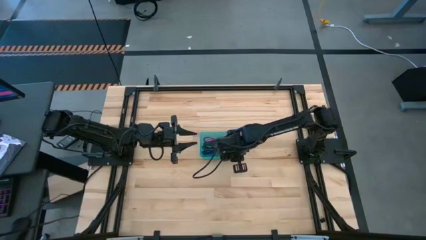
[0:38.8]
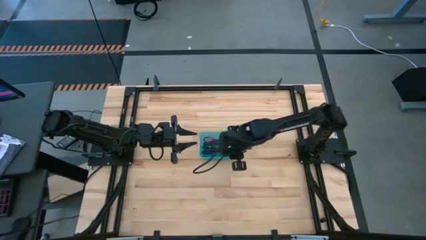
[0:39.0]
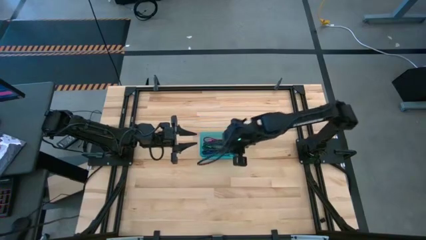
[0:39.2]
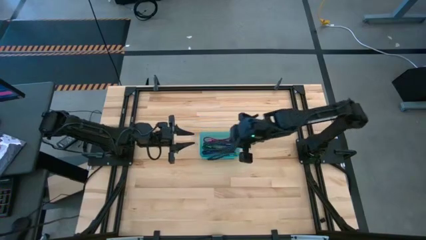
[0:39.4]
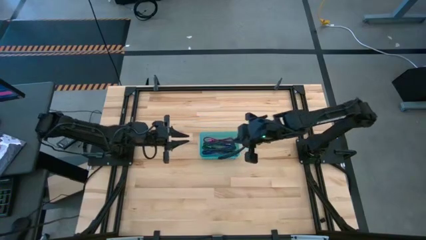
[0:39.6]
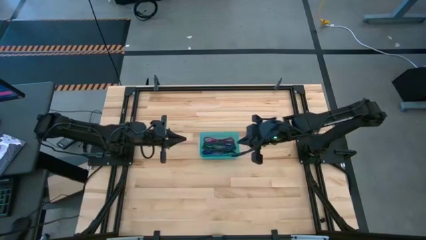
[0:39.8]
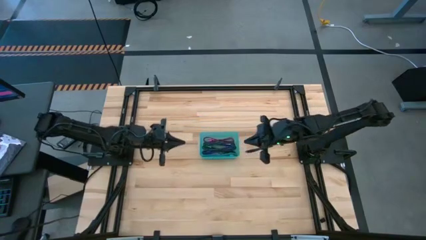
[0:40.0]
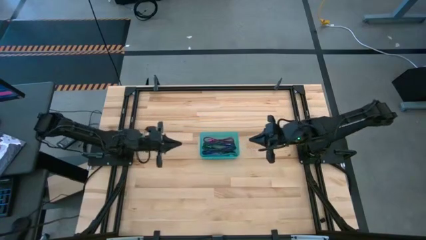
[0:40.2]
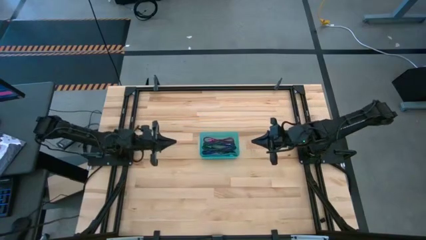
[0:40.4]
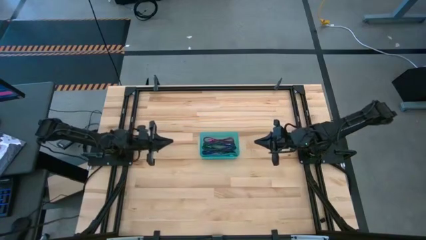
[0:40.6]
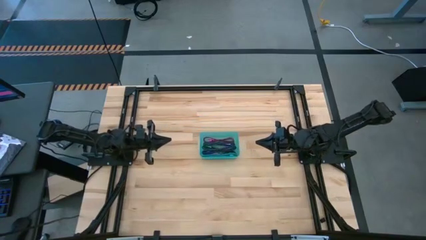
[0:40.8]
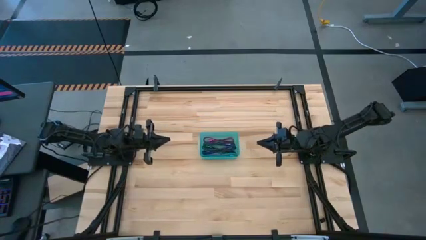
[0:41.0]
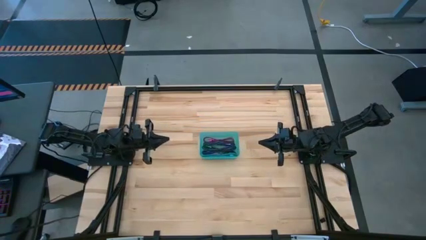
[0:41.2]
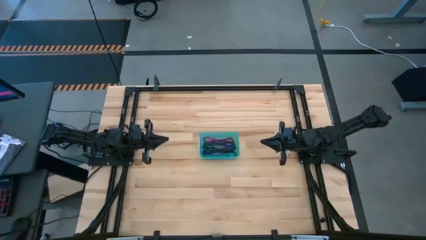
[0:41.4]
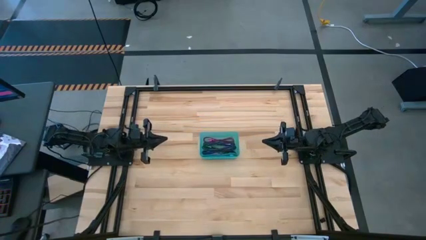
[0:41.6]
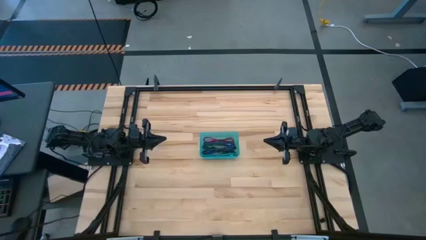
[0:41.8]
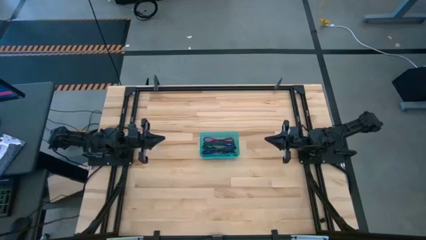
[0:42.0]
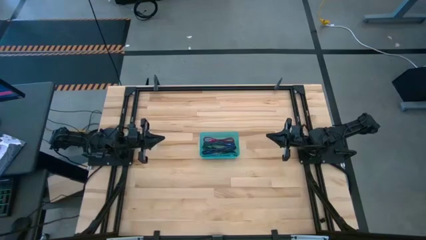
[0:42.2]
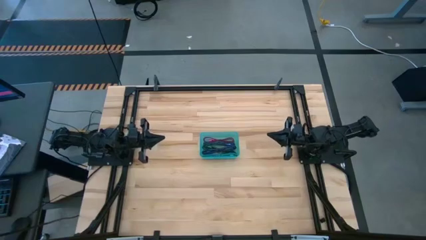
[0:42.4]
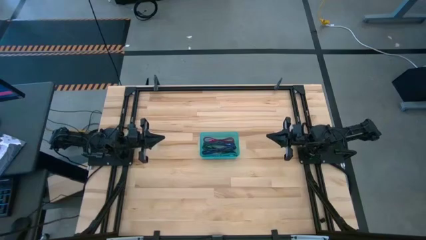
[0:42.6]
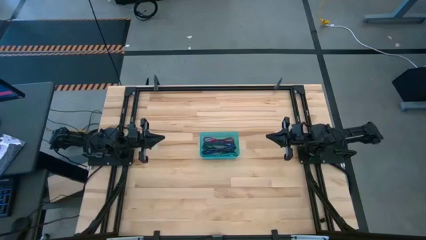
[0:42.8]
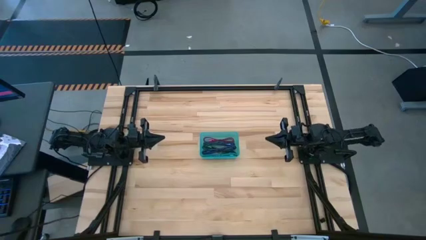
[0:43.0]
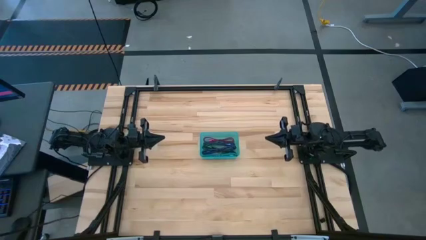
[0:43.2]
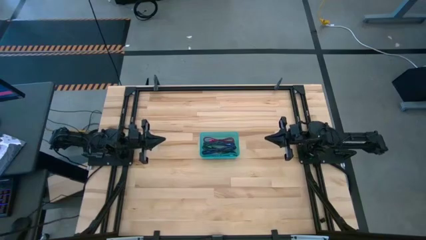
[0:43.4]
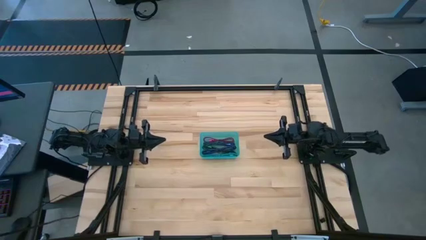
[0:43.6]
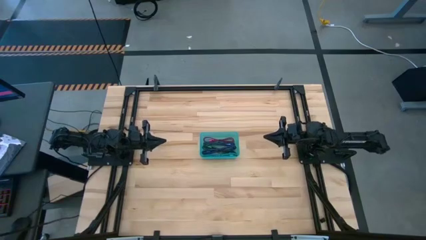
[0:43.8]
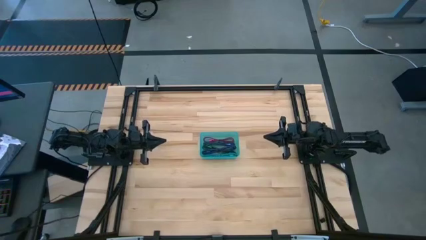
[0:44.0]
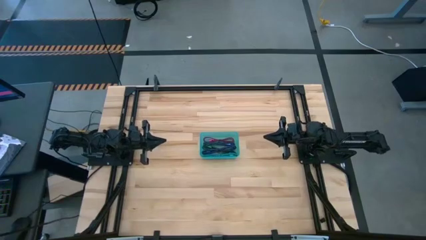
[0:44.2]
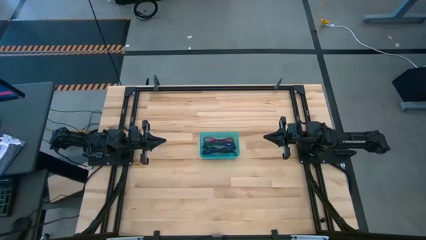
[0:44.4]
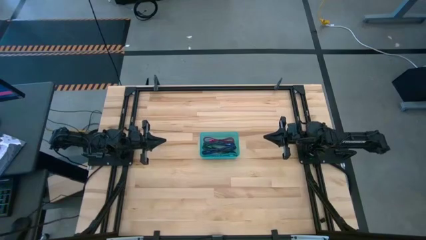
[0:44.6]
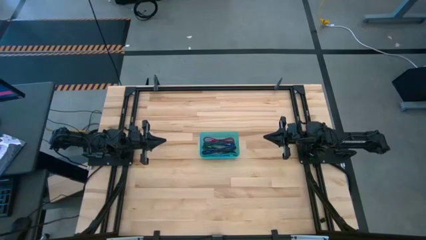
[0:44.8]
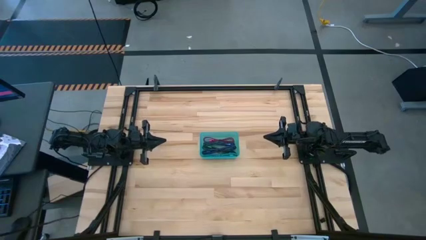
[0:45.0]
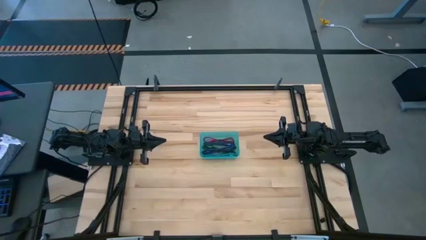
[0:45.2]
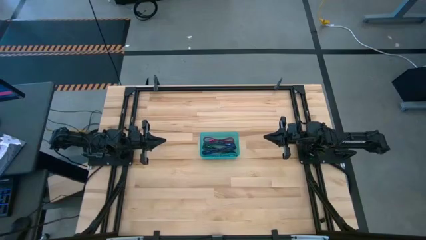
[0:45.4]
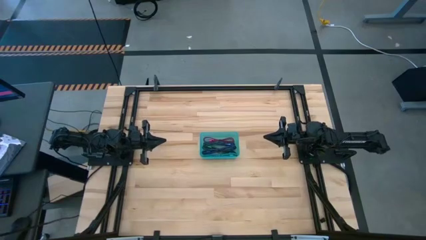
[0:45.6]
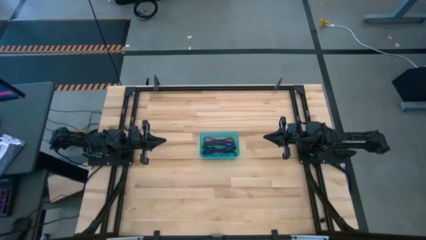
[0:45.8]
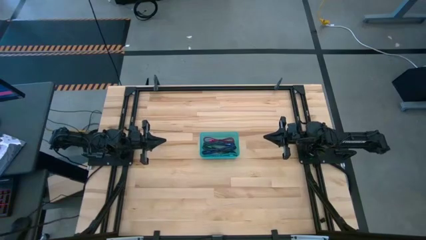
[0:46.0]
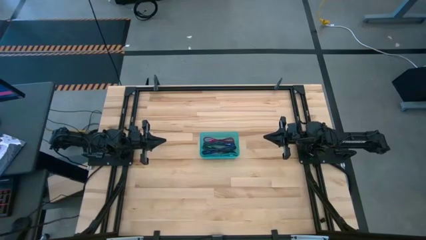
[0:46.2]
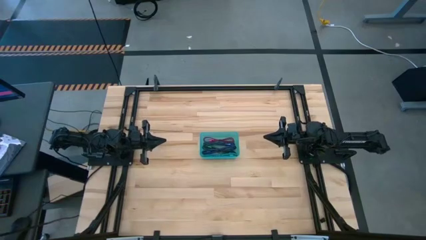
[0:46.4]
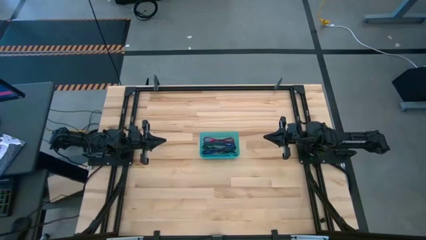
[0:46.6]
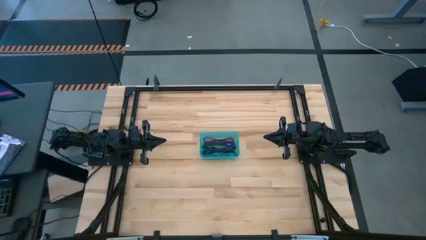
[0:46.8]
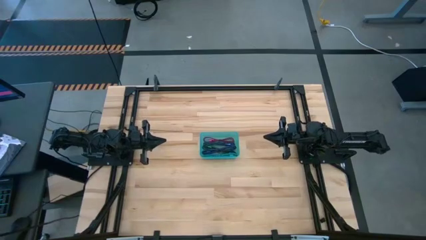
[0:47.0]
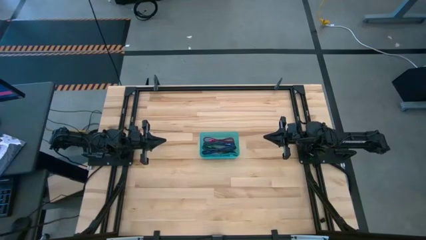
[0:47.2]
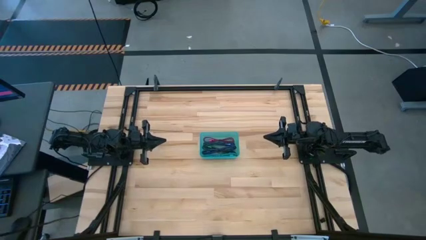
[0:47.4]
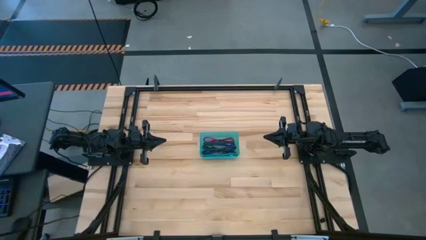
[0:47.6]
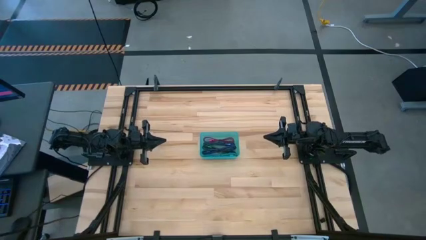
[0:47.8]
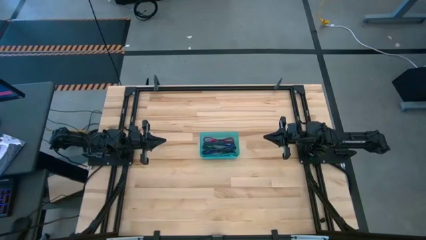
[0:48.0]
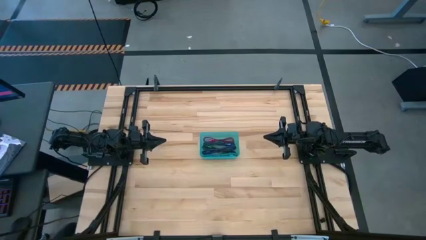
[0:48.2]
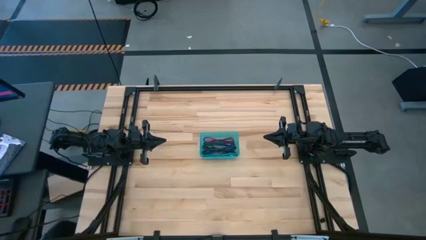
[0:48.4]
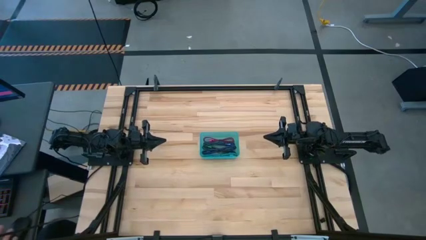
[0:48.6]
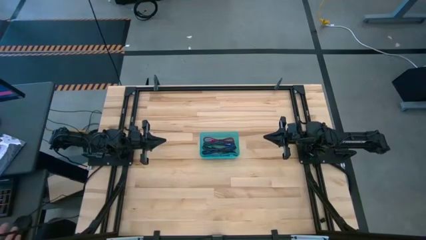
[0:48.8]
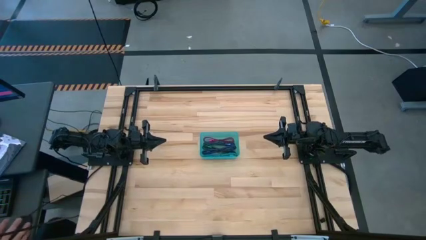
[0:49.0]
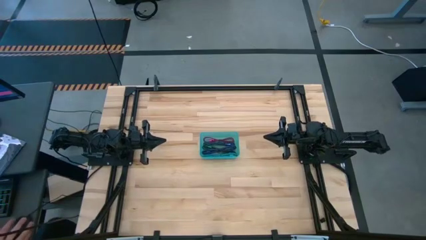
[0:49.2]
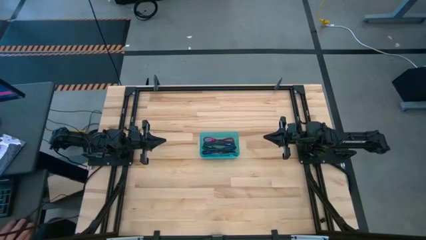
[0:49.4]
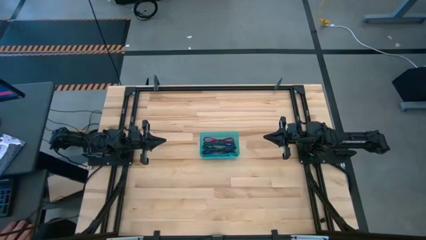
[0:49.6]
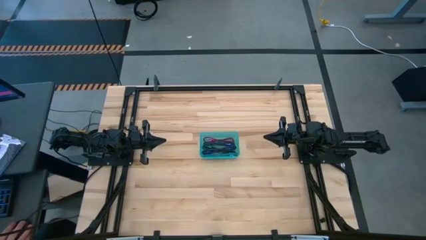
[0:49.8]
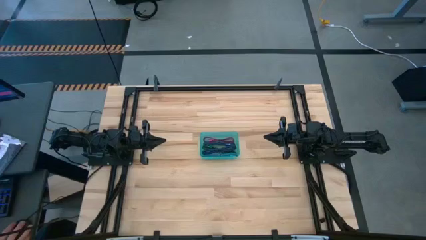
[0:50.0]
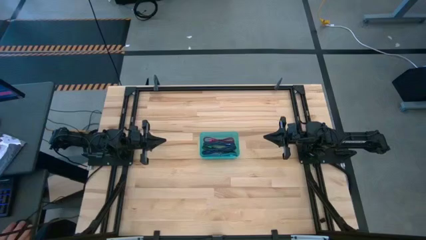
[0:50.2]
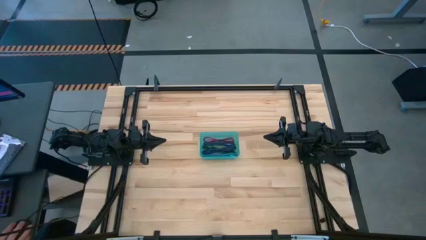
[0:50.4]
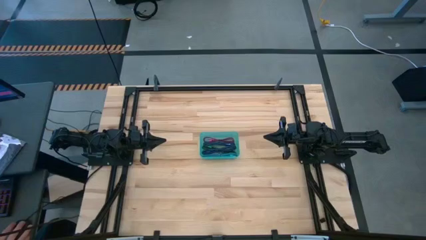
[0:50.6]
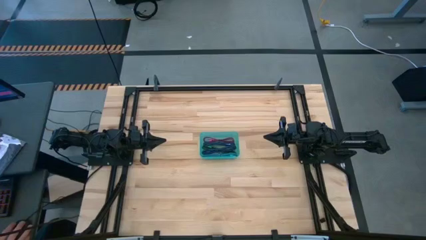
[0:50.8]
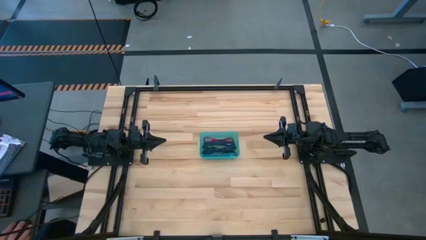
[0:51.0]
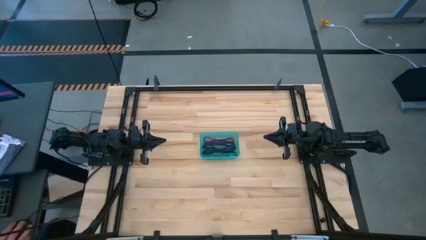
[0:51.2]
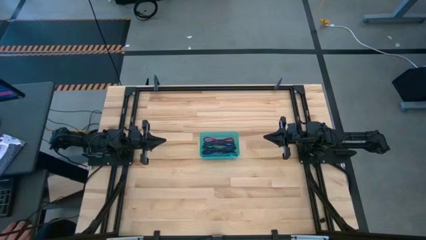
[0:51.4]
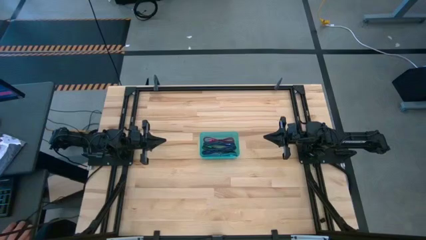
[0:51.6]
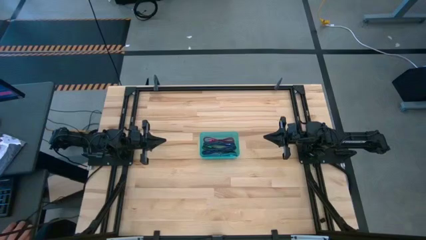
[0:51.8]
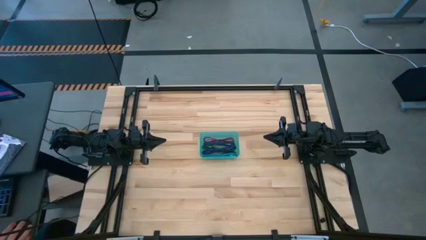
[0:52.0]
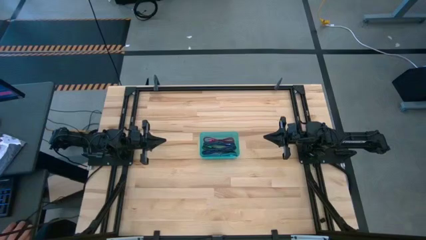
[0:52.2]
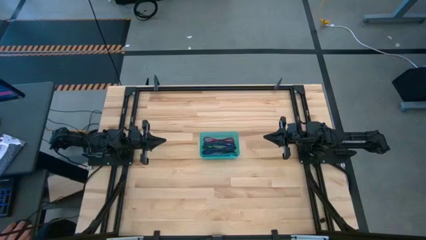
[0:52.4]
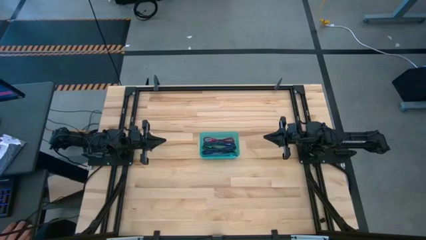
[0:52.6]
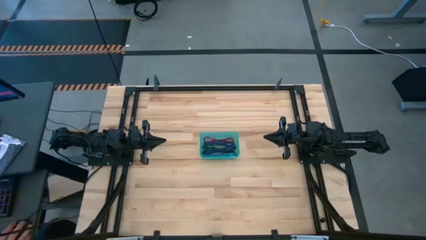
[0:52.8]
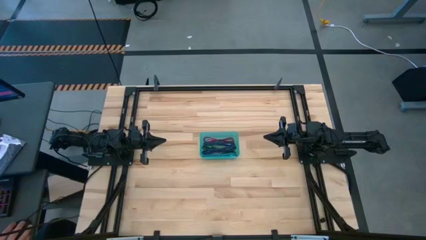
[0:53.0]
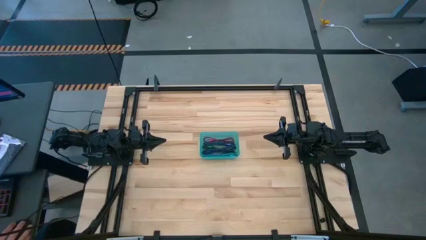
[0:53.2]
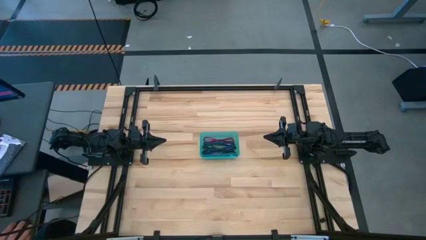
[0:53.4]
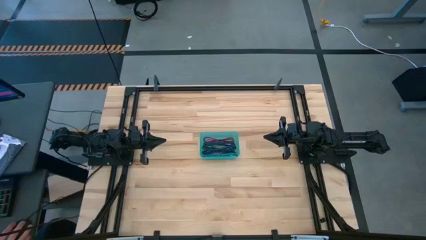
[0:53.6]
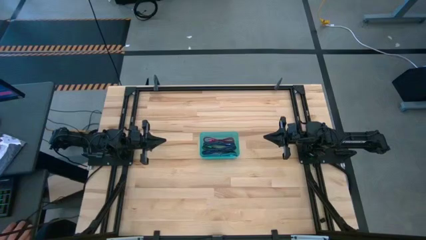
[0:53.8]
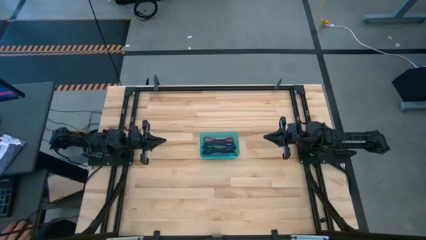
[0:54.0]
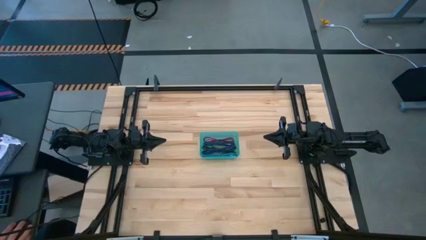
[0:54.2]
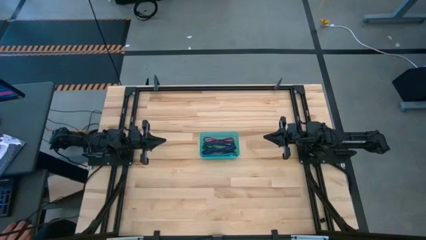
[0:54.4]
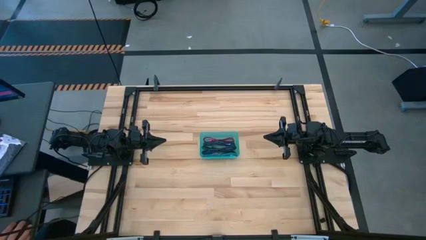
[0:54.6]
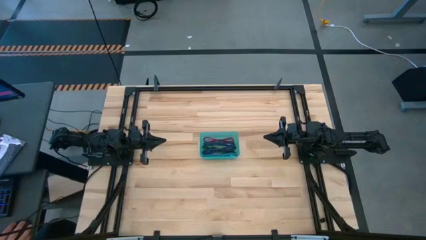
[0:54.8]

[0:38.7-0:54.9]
Task: Pick and place USB-C Cables
Return to Home Position
